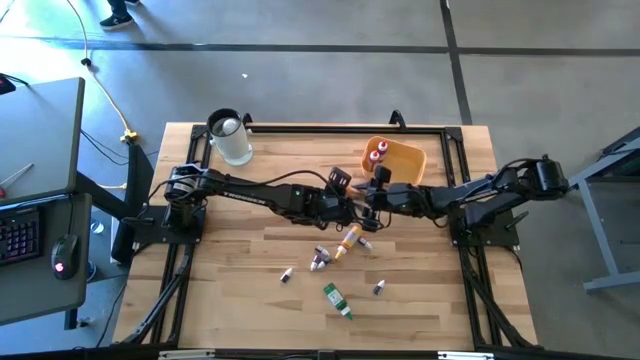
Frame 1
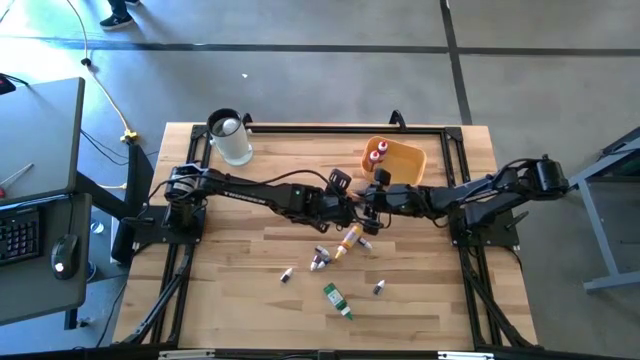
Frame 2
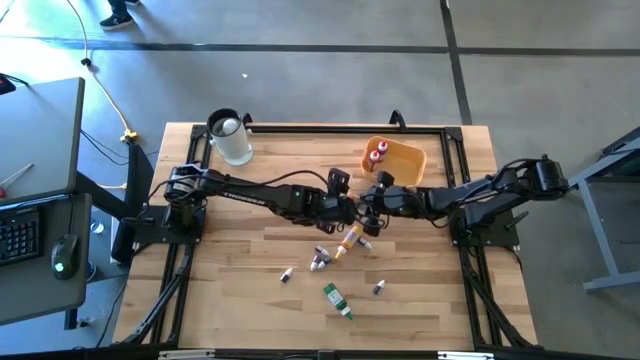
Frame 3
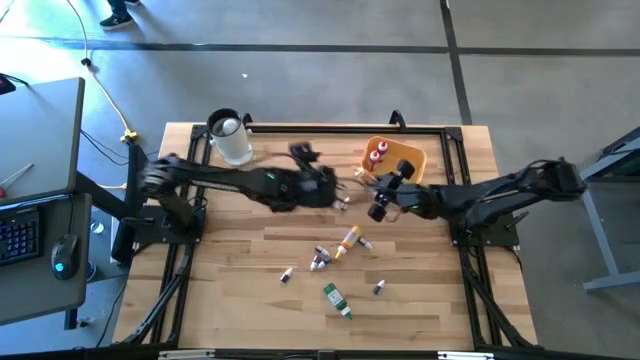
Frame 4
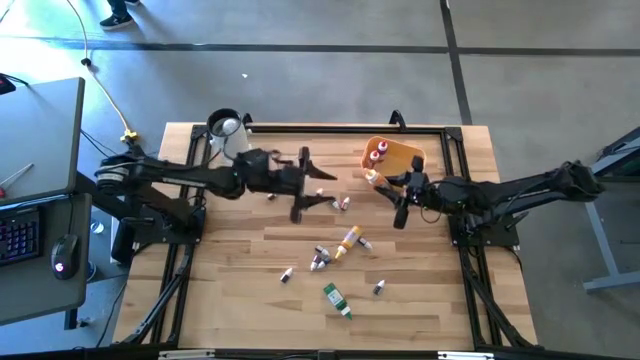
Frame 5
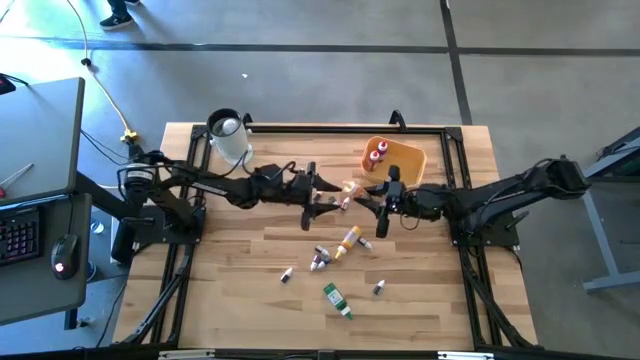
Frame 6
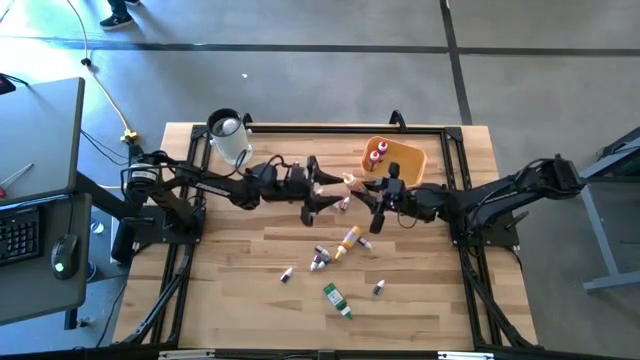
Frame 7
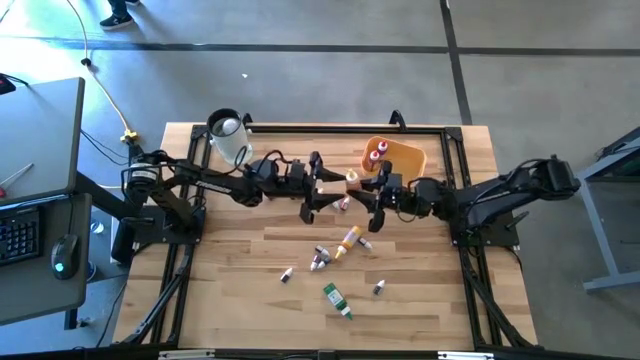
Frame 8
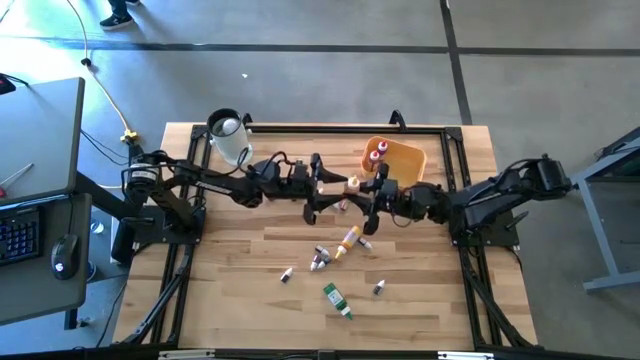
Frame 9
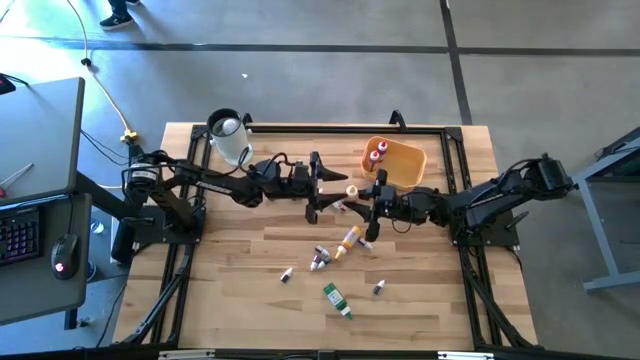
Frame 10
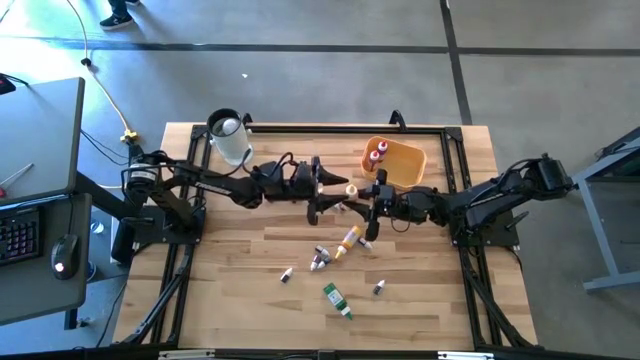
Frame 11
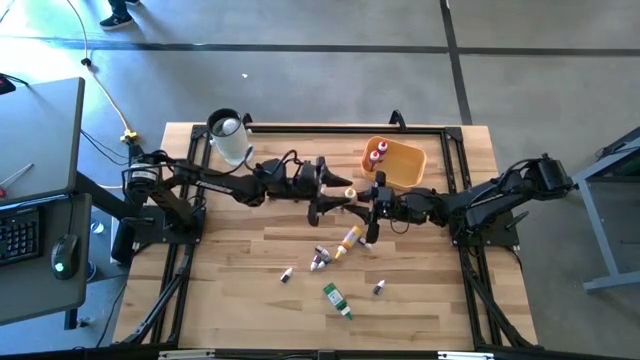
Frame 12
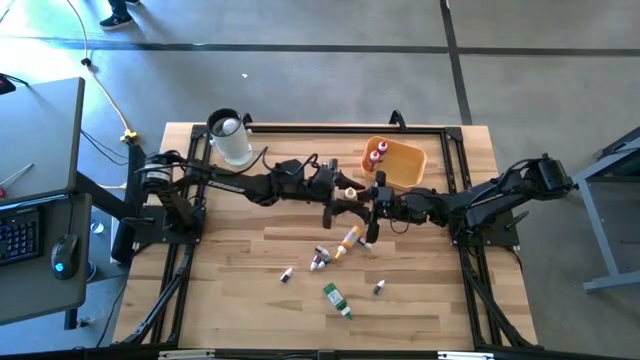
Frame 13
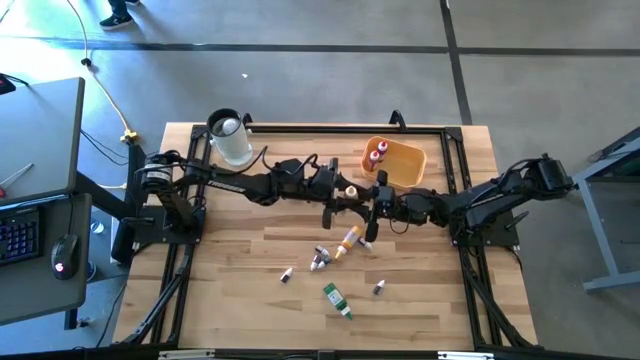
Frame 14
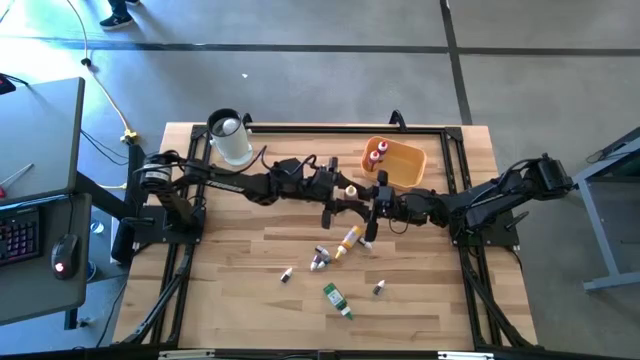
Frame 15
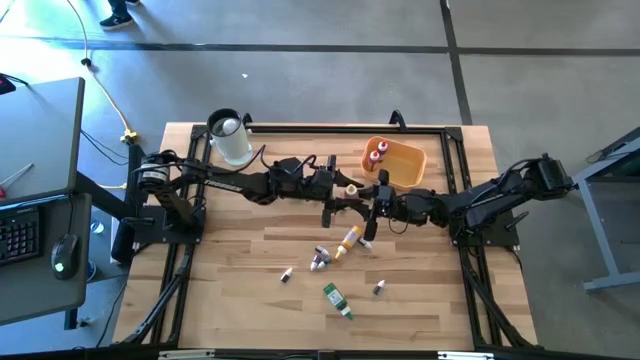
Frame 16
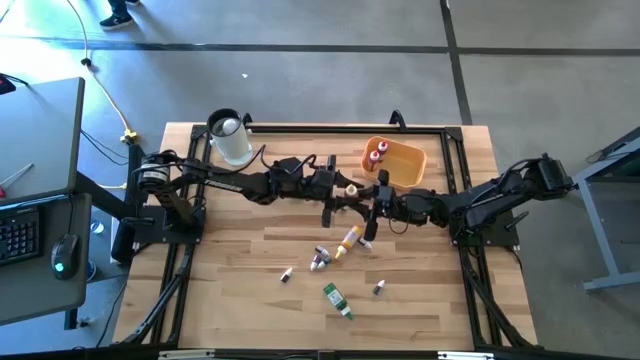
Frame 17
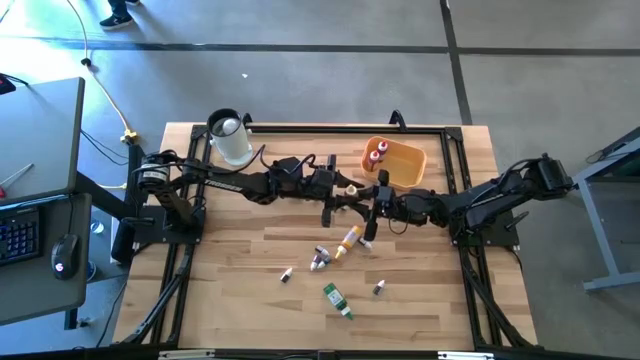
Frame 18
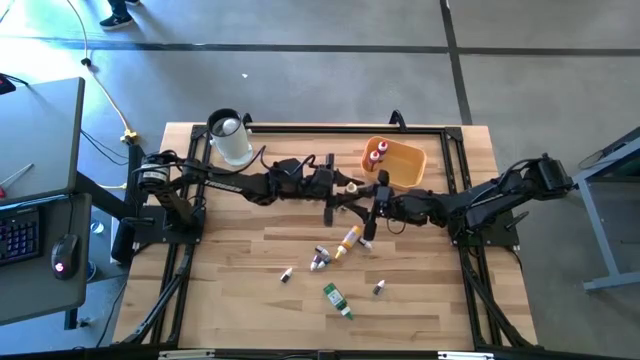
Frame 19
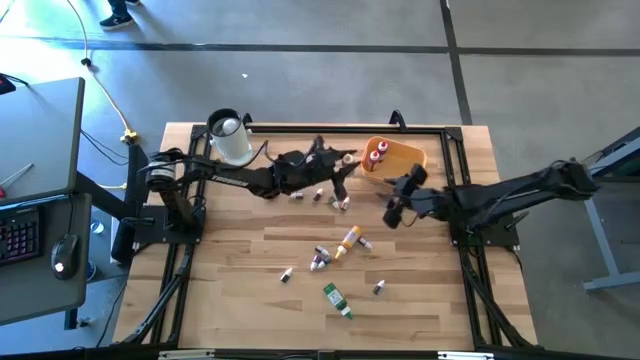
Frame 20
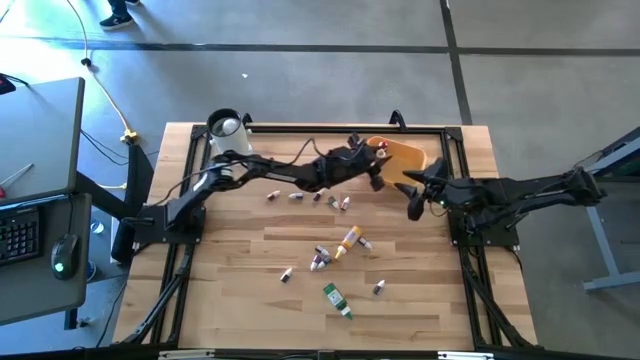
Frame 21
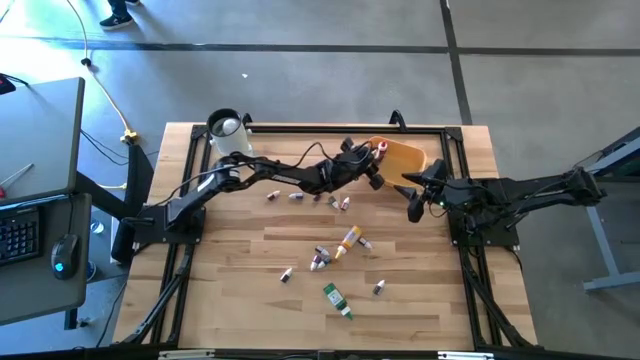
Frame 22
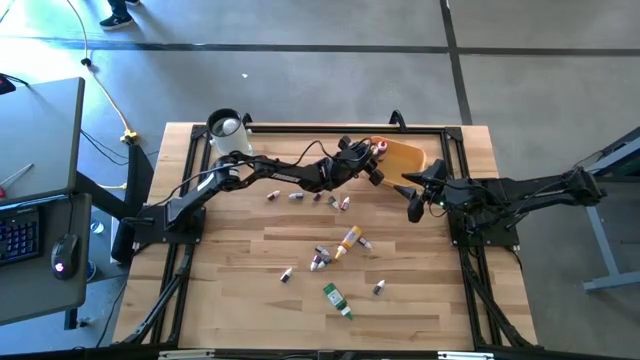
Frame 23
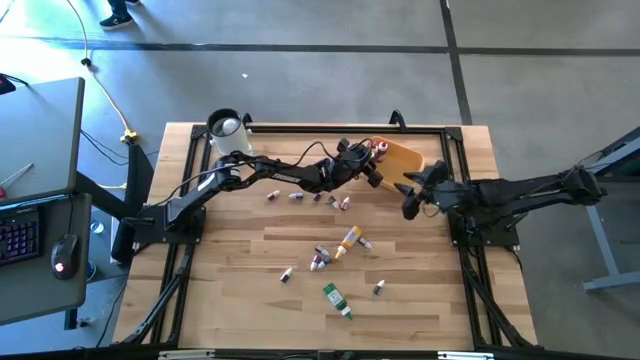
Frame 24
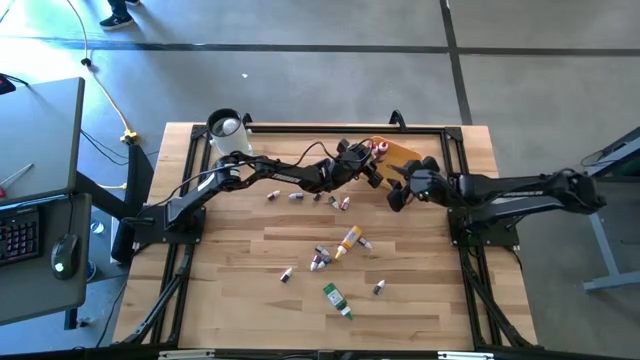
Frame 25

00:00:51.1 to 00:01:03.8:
Task: Pick & Place food coloring
Put the bottom large yellow food coloring bottle into the yellow bin

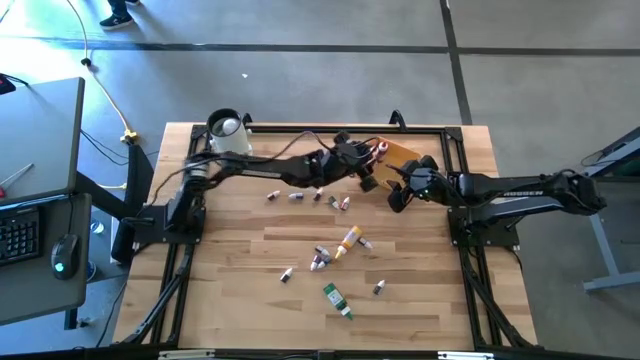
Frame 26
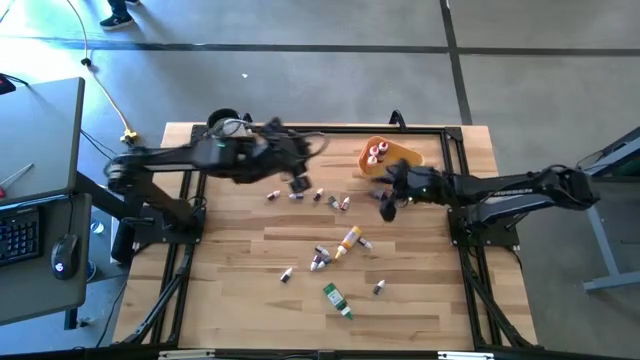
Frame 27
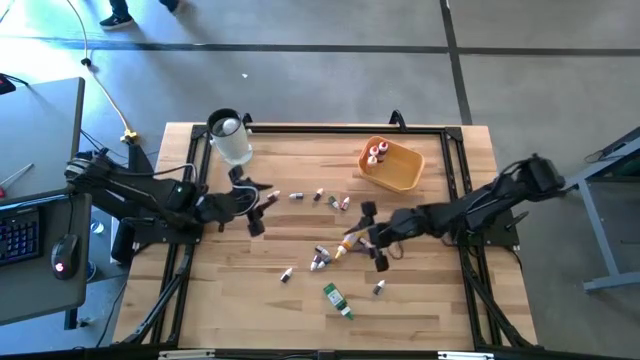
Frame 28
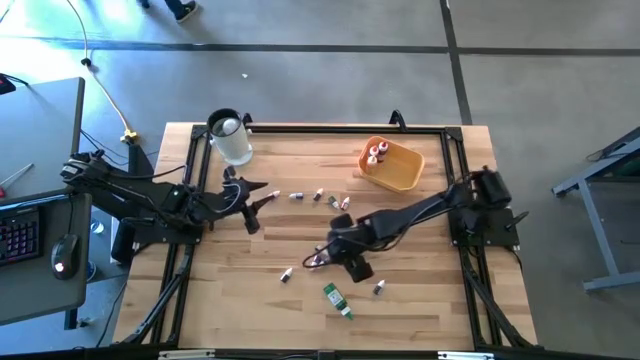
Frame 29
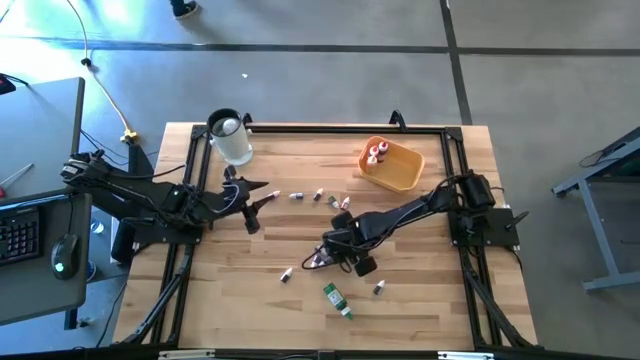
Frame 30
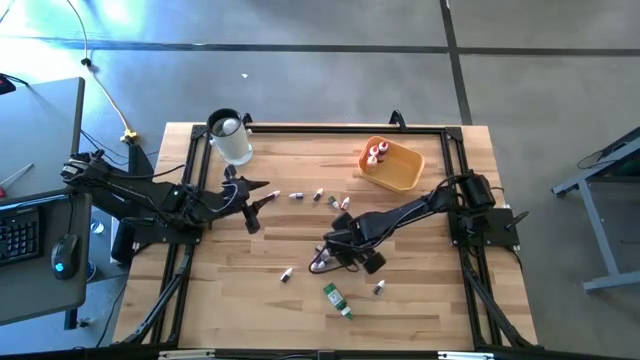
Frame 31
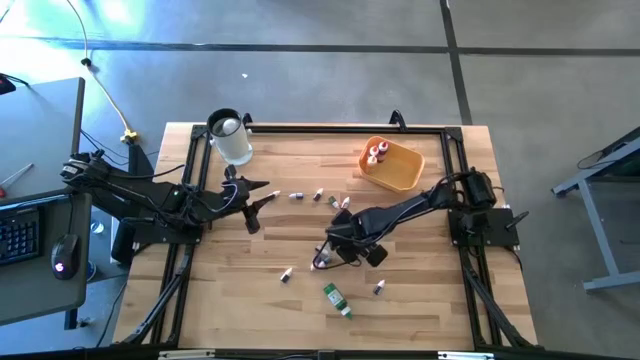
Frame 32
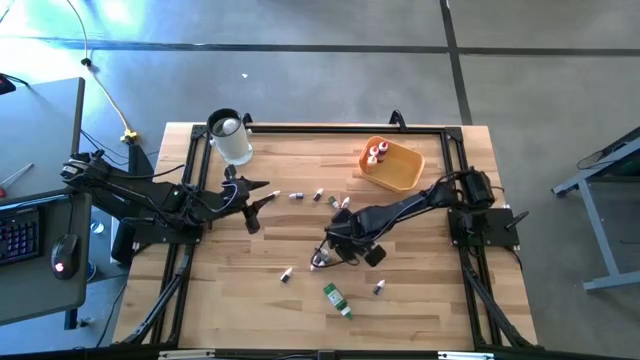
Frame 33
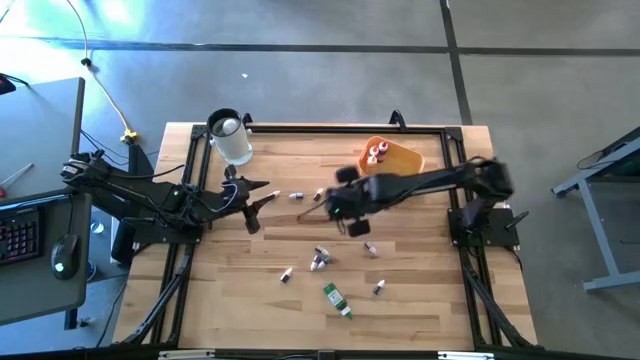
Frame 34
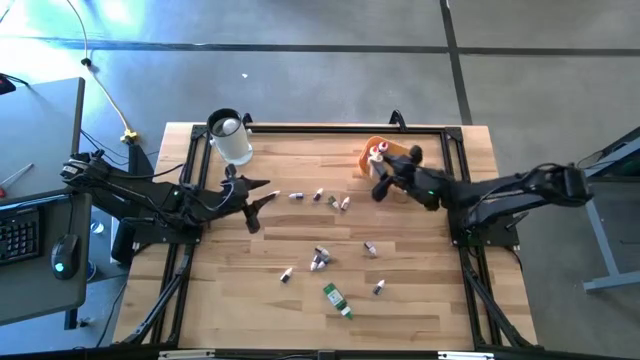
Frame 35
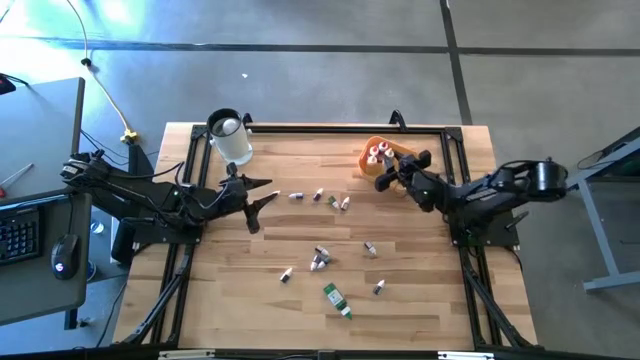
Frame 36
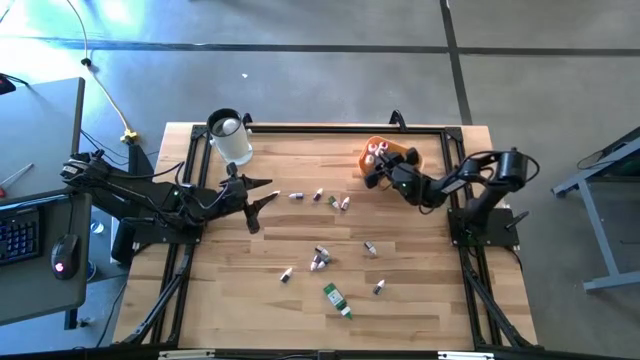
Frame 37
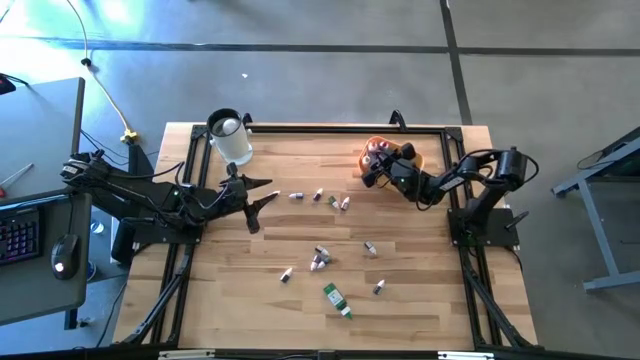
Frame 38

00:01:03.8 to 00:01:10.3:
Put the large yellow food coloring bottle into the yellow bin
